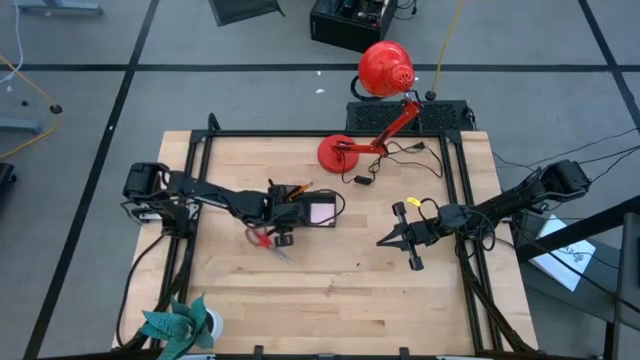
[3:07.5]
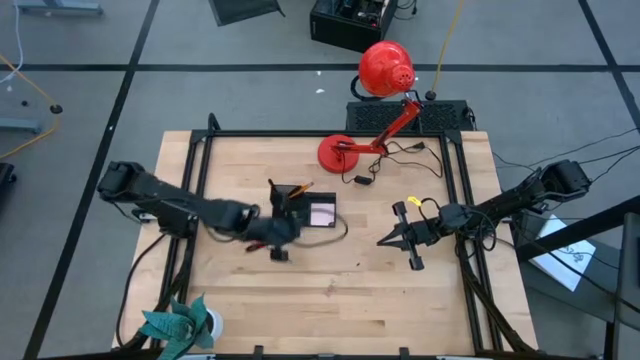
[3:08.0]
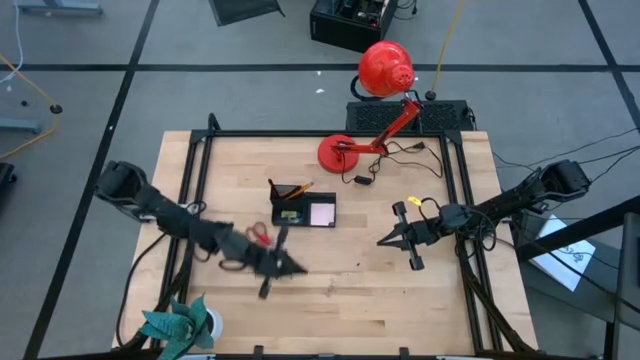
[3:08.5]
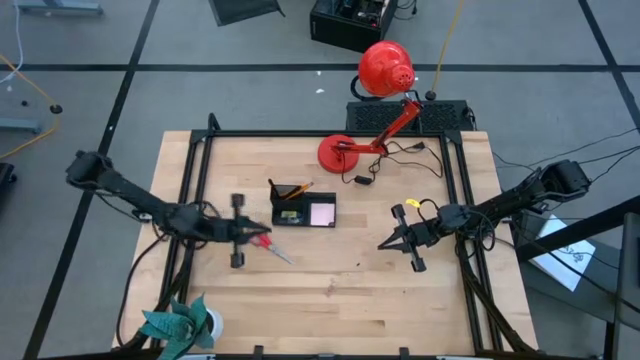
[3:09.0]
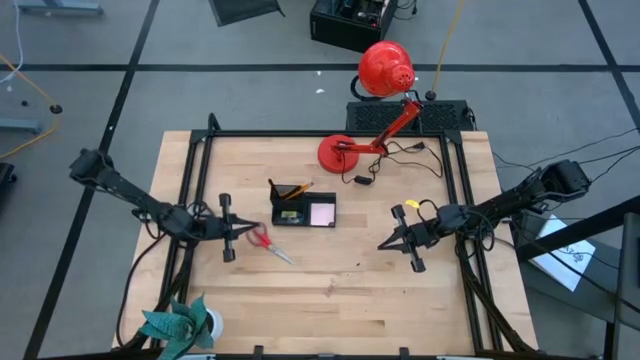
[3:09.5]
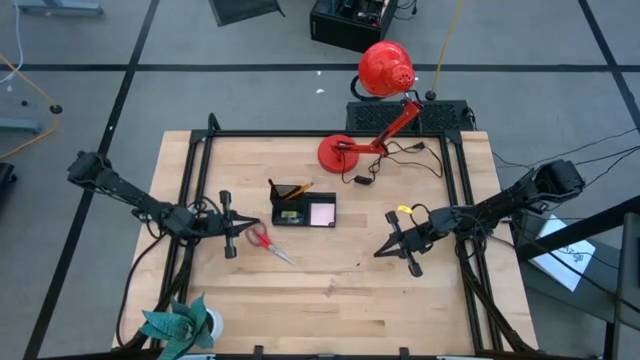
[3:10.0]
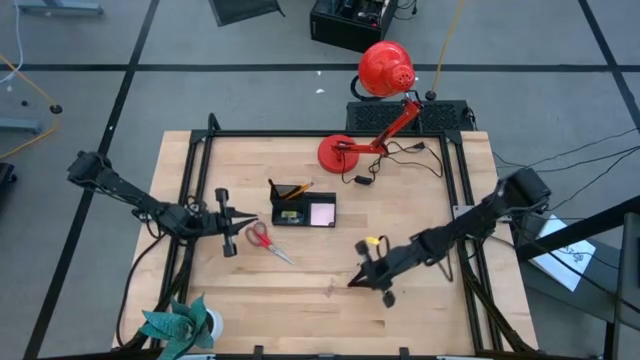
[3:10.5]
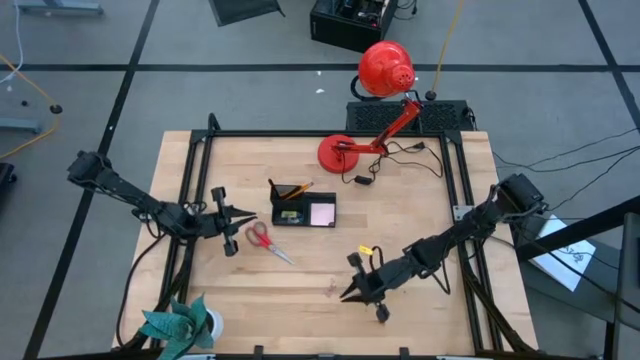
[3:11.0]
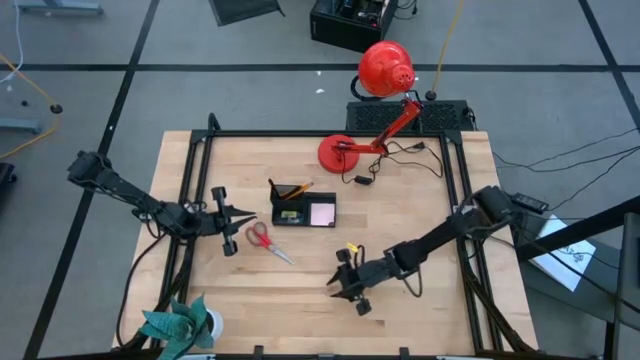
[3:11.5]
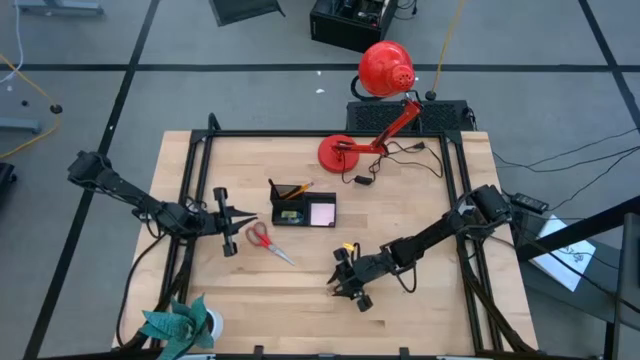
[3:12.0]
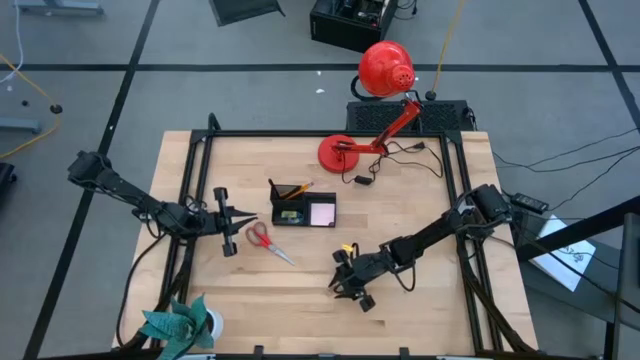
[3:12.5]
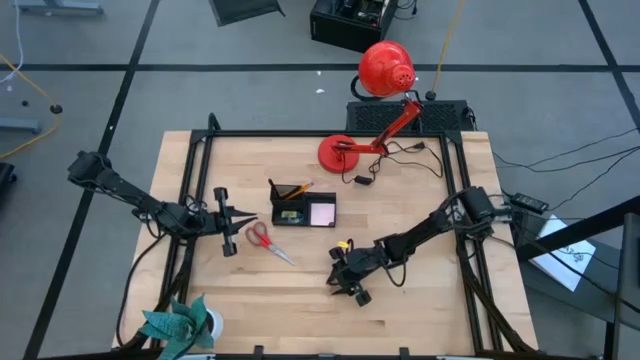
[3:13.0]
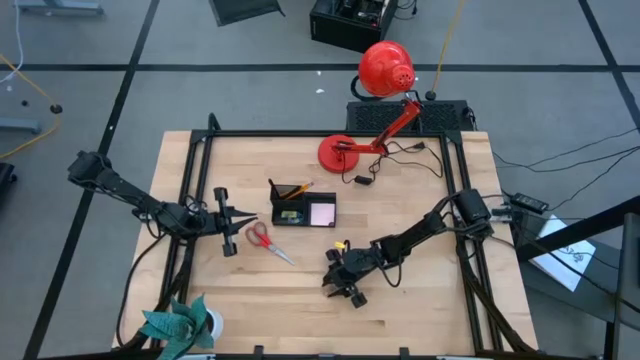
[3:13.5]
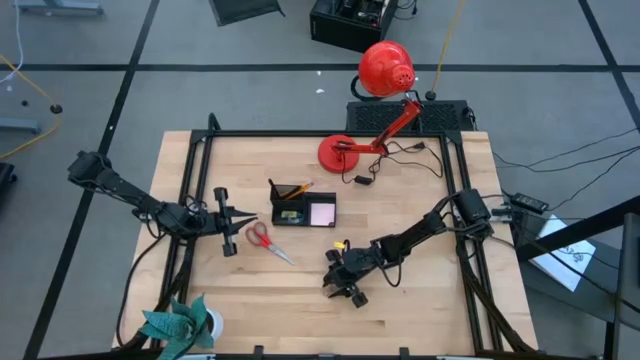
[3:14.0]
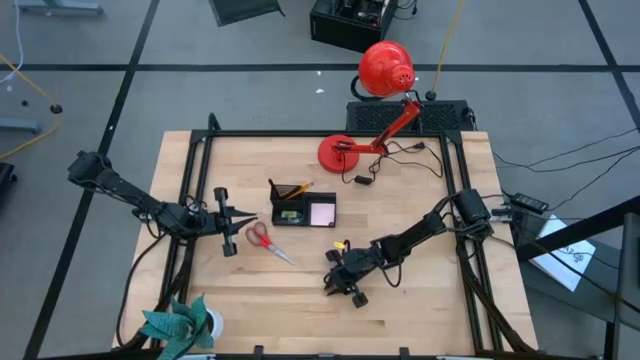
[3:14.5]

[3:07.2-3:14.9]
Task: Pick and place office supplies into organizer
Put the pink binder clip into the mesh desk organizer

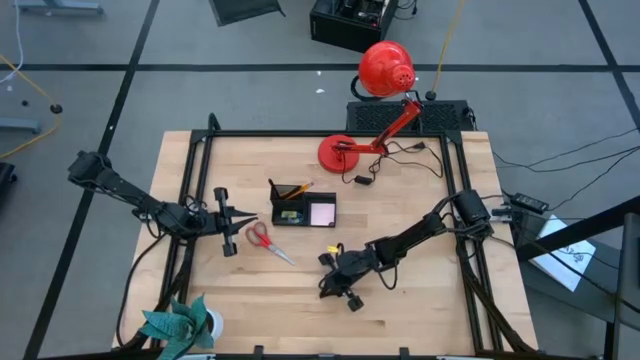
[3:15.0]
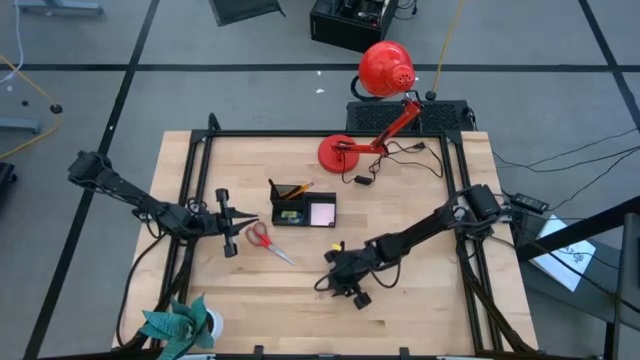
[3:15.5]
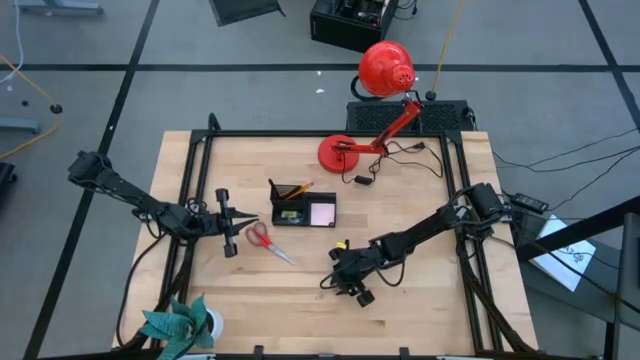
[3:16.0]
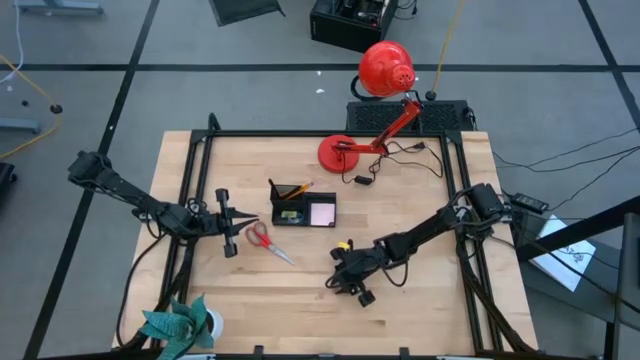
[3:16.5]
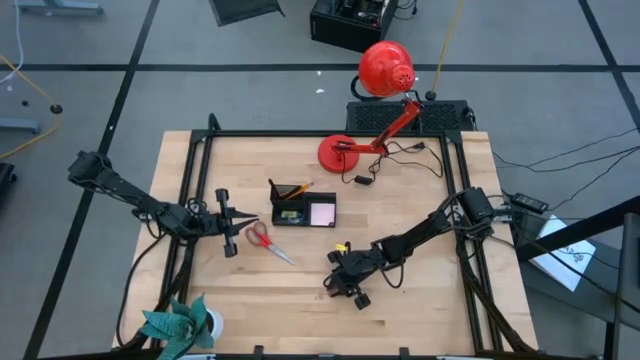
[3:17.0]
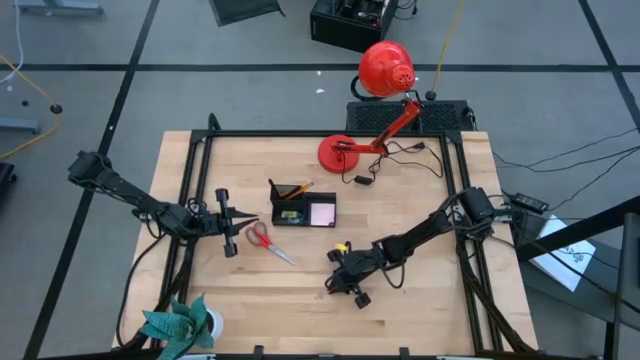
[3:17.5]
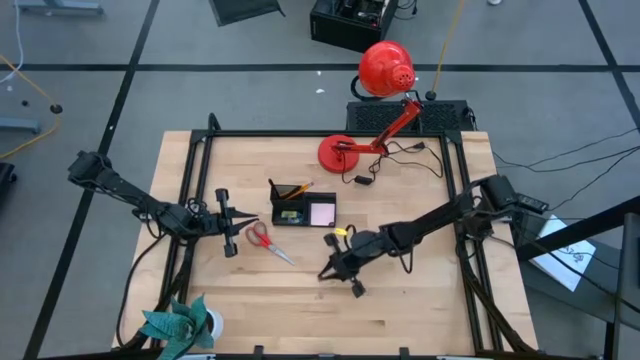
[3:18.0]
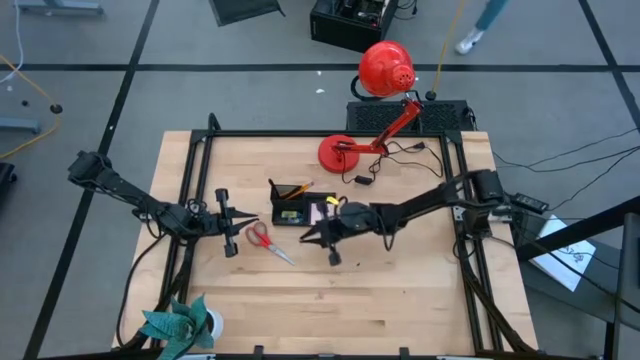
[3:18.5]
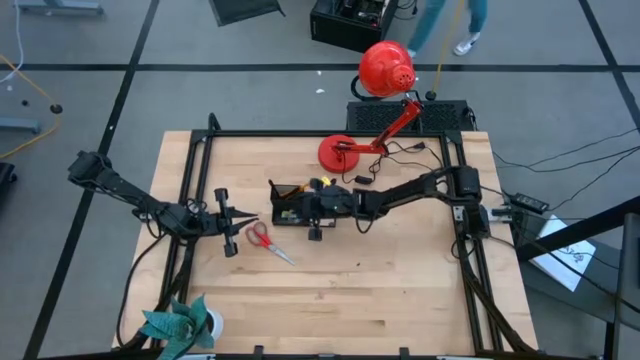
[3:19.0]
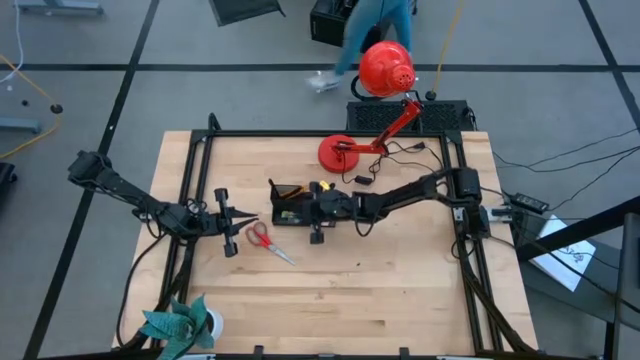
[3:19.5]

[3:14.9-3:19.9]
Put the pink binder clip into the mesh desk organizer

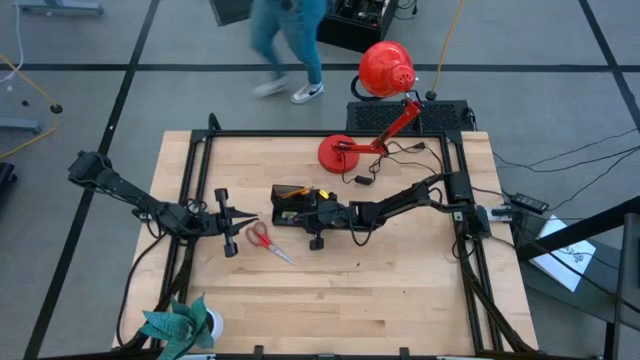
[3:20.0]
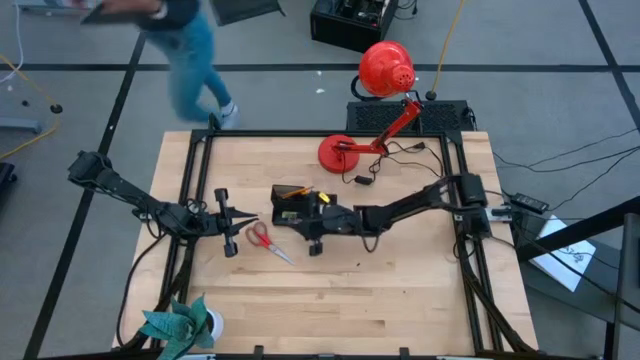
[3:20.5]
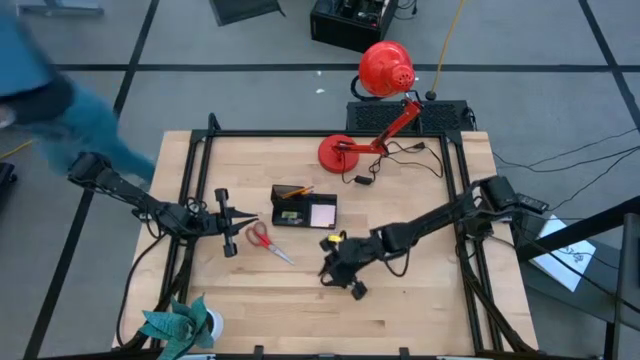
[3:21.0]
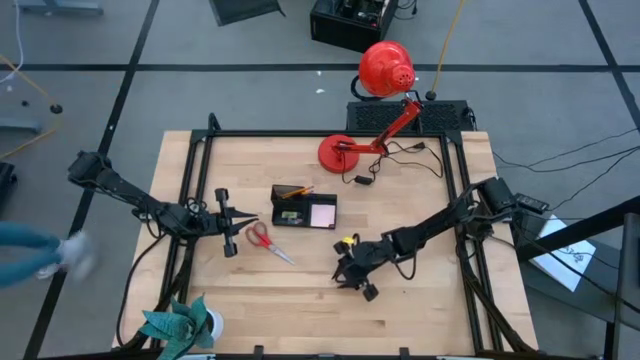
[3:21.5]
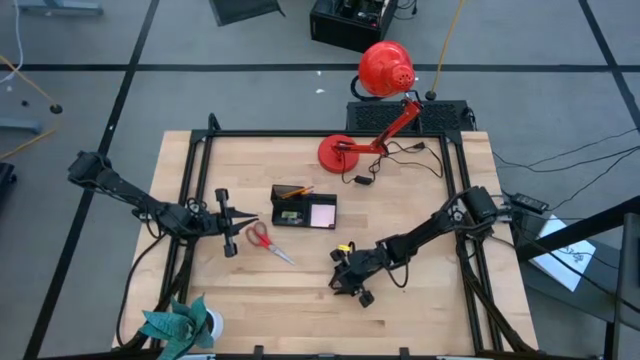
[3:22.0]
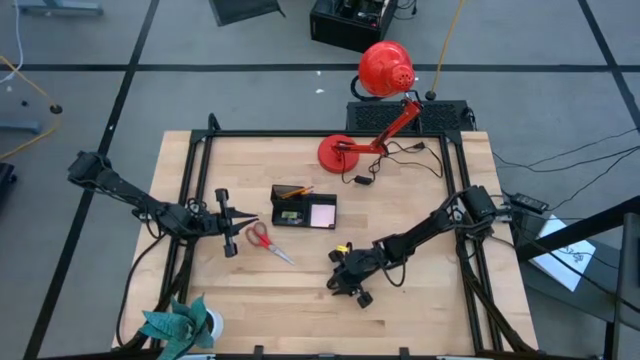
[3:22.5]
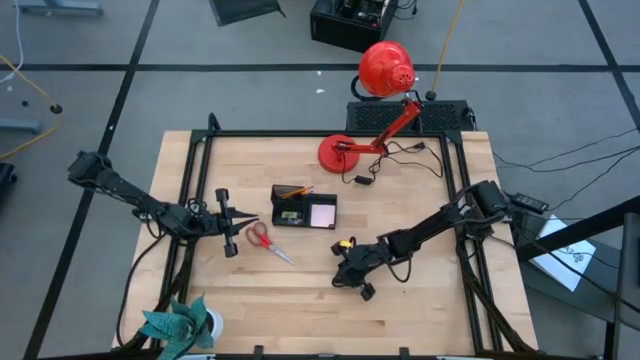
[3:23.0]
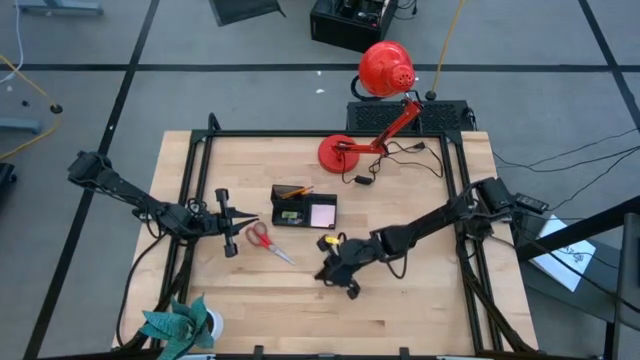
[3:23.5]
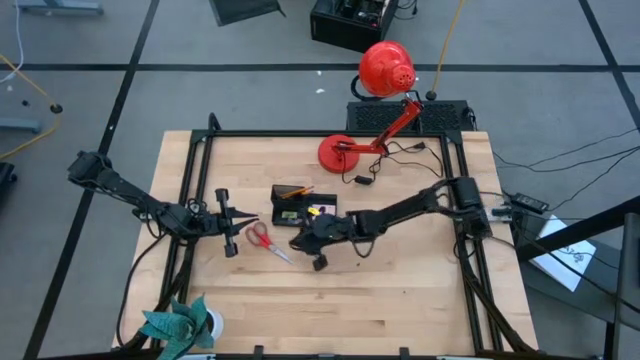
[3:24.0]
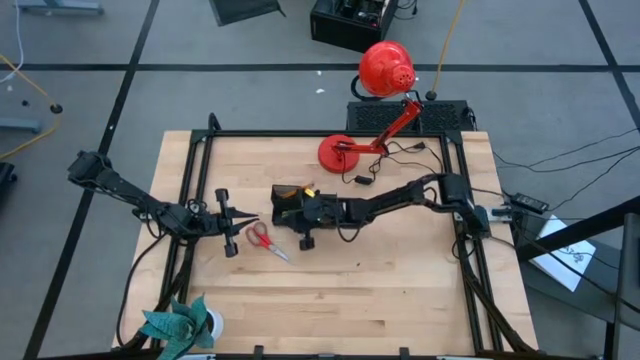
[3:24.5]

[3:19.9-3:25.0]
Put the light yellow binder clip into the mesh desk organizer

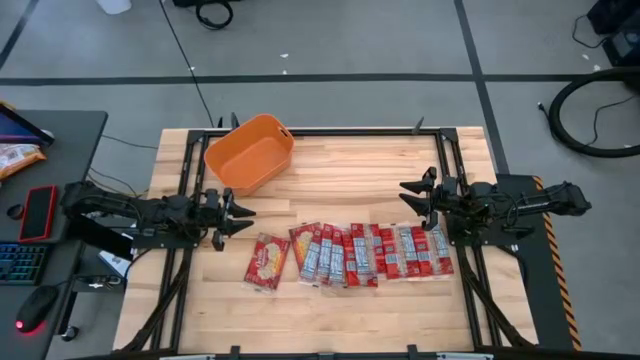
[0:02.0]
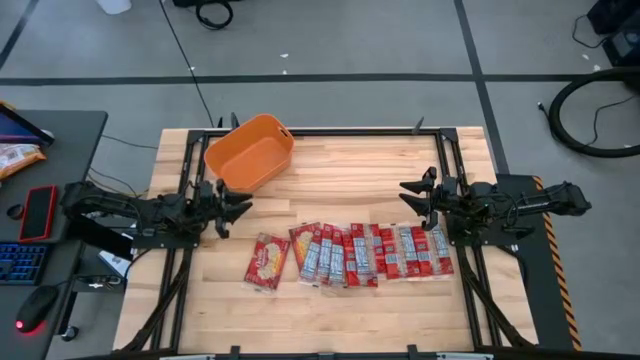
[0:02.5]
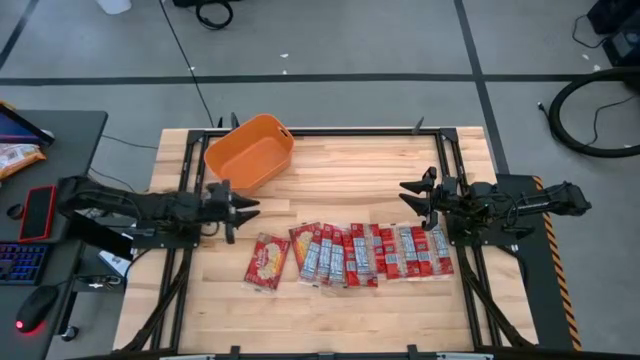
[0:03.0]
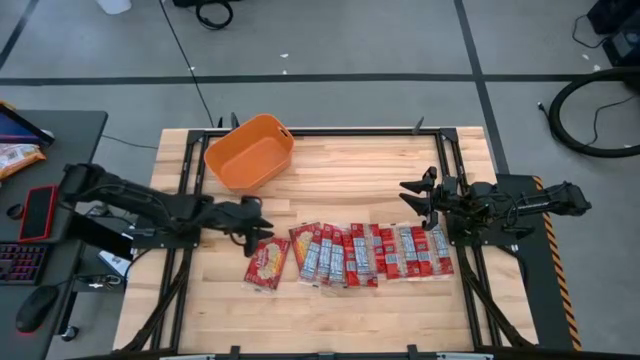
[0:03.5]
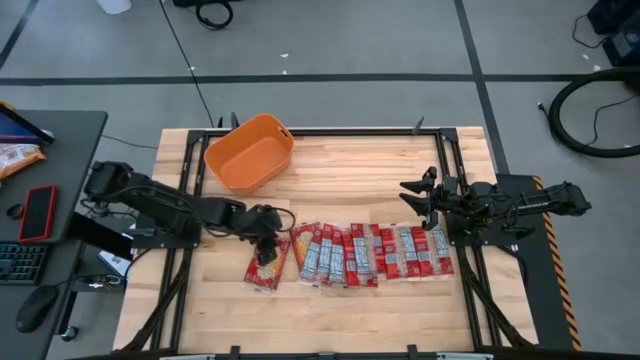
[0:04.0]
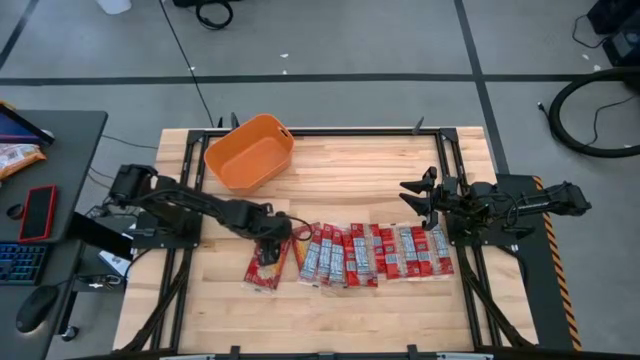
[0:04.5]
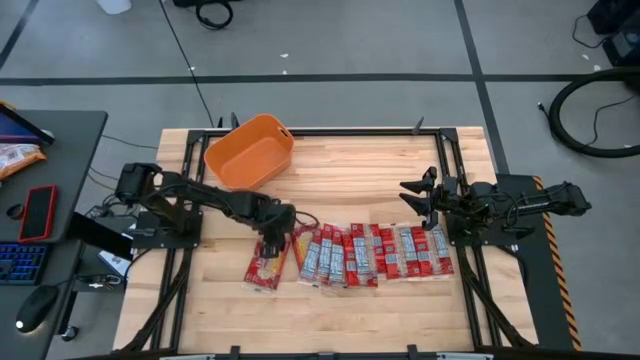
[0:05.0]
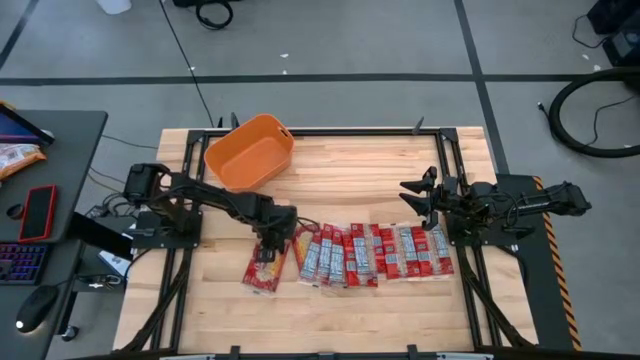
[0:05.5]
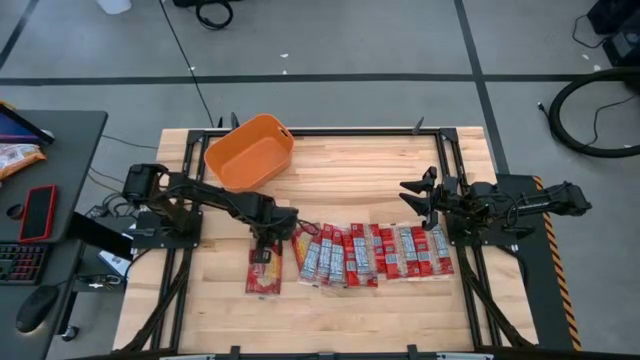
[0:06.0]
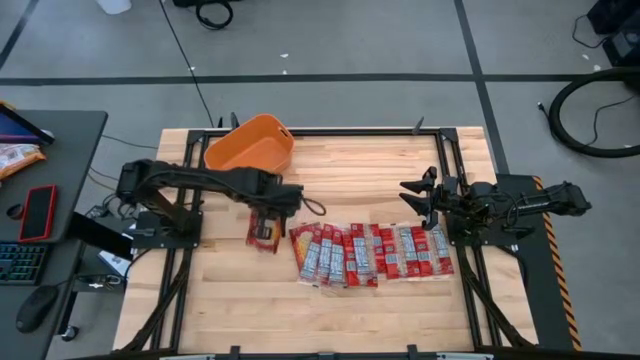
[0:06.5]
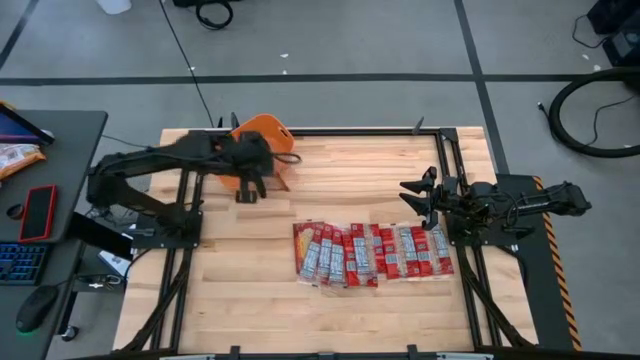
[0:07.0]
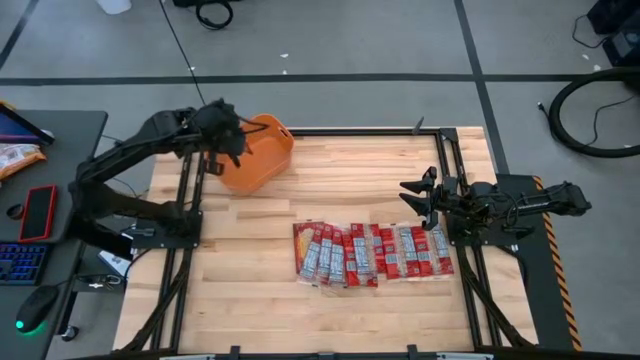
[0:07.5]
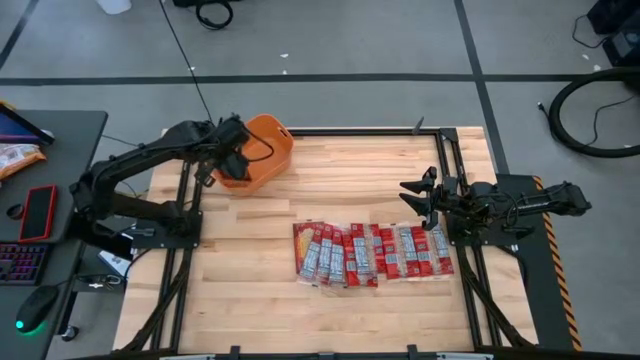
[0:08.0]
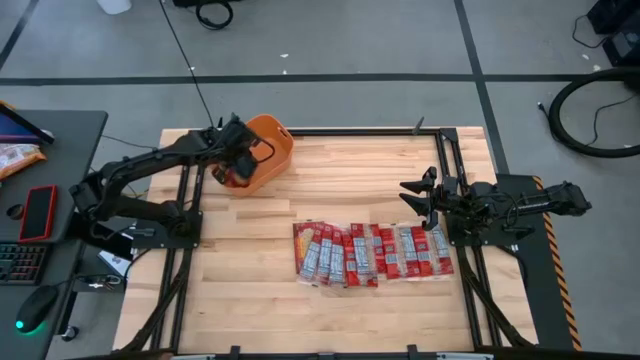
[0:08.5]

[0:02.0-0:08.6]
Task: Sort popcorn bags into baskets
Put the red popcorn bag into the orange container
